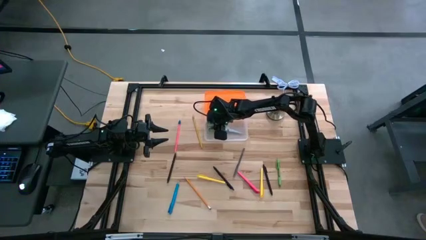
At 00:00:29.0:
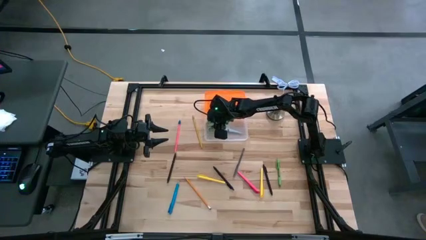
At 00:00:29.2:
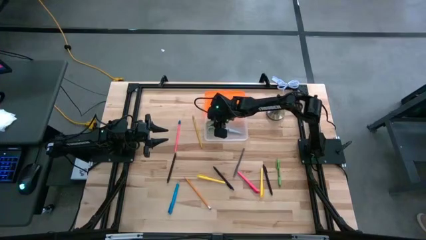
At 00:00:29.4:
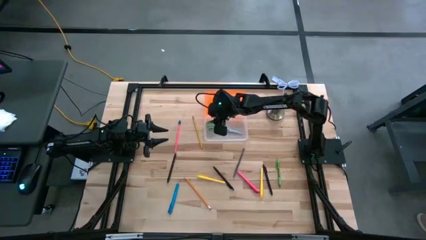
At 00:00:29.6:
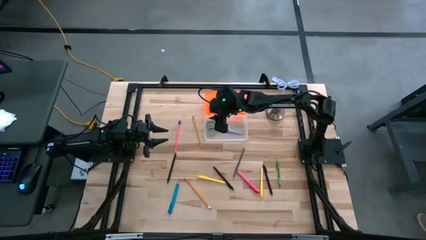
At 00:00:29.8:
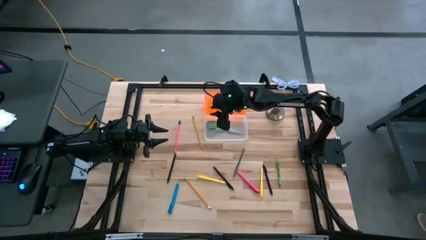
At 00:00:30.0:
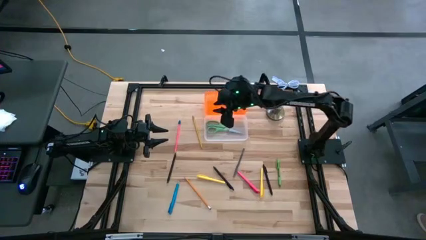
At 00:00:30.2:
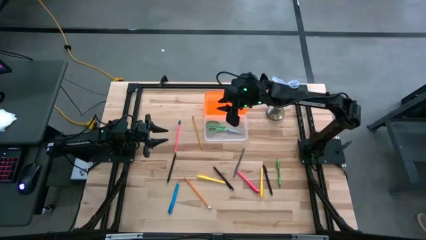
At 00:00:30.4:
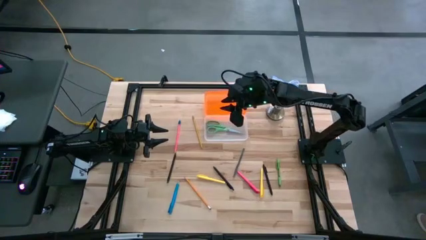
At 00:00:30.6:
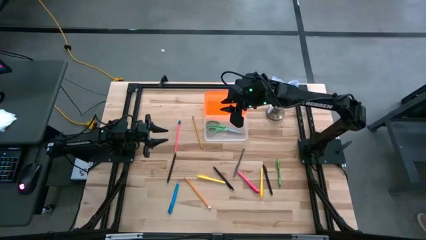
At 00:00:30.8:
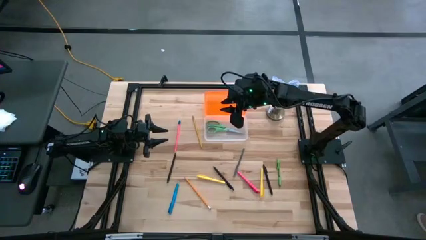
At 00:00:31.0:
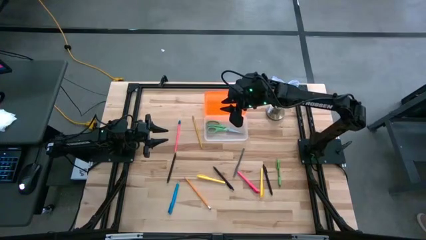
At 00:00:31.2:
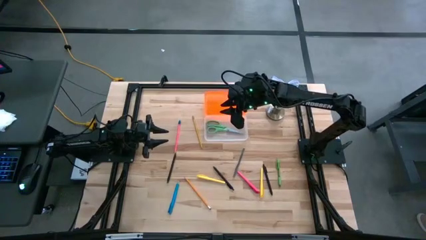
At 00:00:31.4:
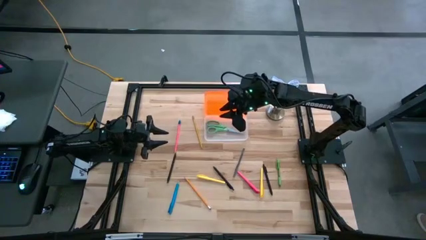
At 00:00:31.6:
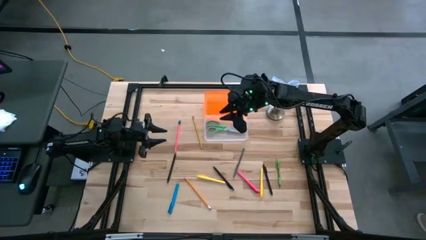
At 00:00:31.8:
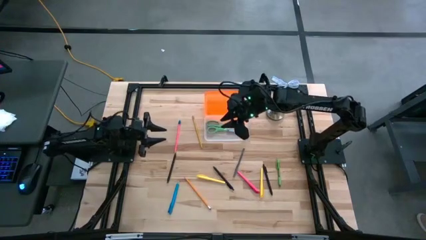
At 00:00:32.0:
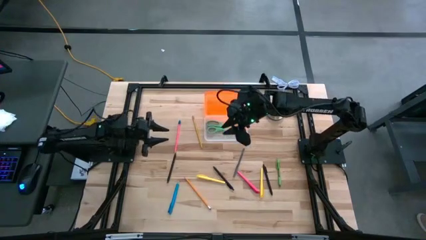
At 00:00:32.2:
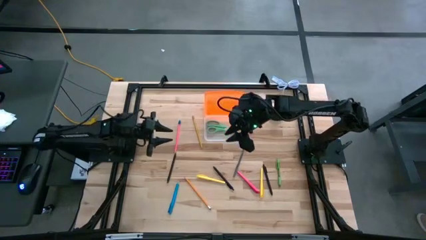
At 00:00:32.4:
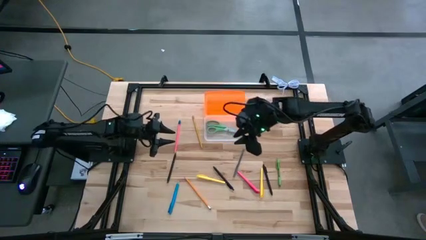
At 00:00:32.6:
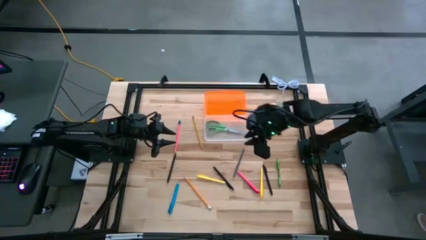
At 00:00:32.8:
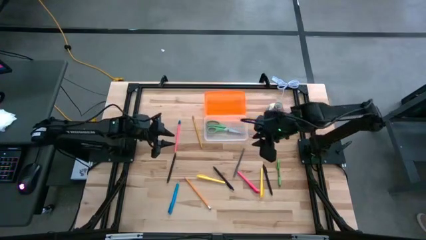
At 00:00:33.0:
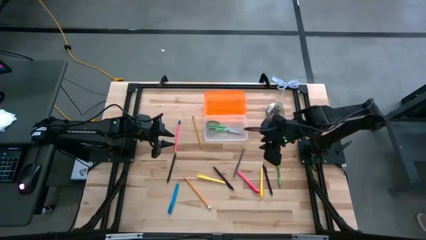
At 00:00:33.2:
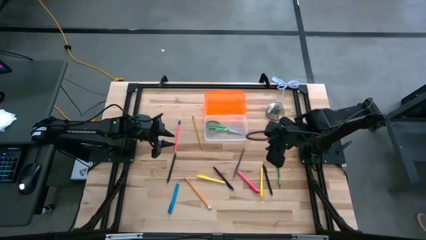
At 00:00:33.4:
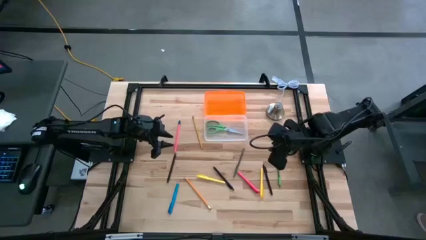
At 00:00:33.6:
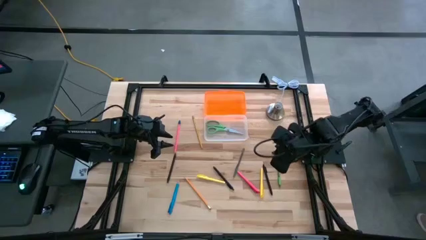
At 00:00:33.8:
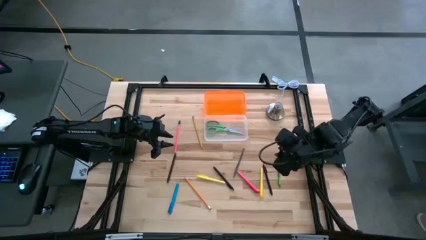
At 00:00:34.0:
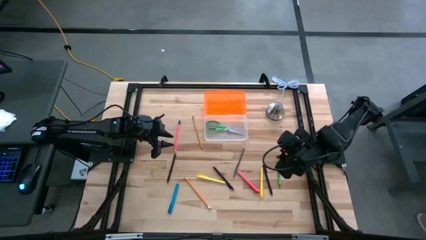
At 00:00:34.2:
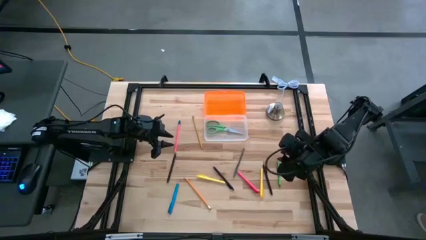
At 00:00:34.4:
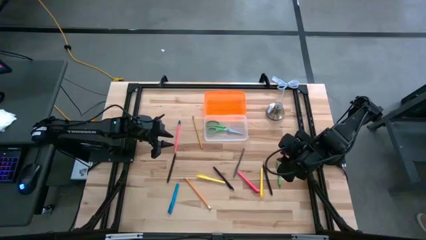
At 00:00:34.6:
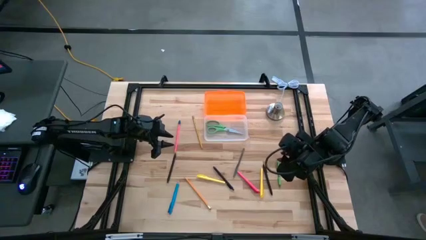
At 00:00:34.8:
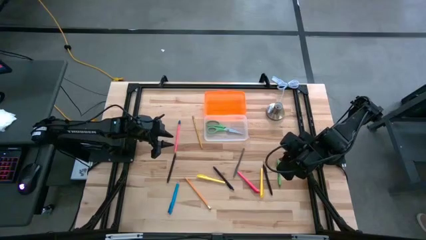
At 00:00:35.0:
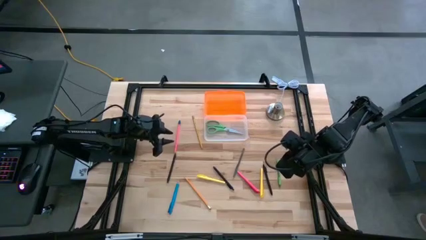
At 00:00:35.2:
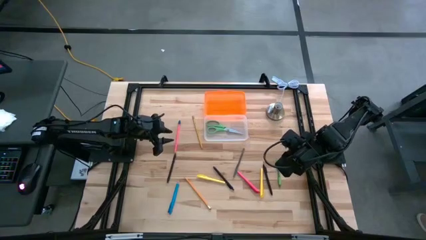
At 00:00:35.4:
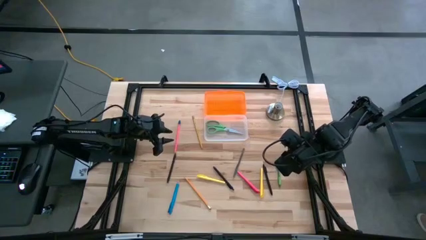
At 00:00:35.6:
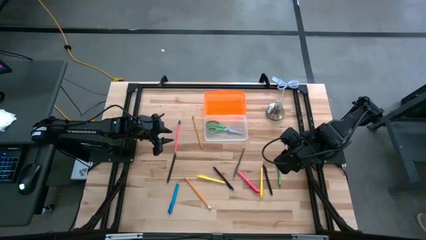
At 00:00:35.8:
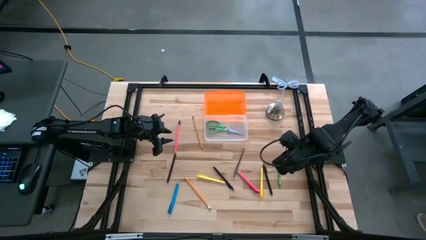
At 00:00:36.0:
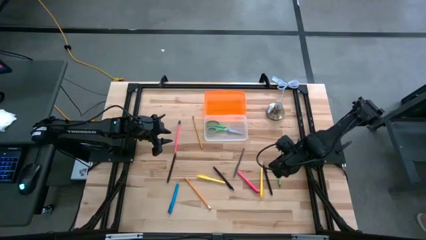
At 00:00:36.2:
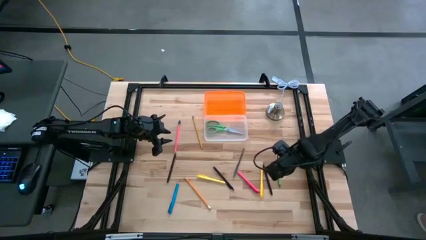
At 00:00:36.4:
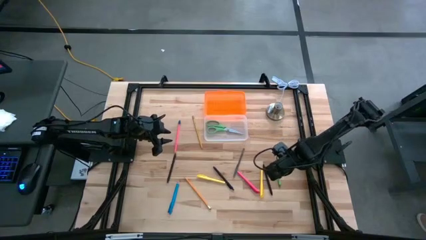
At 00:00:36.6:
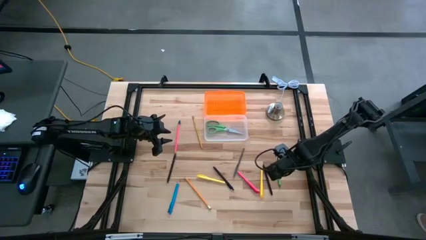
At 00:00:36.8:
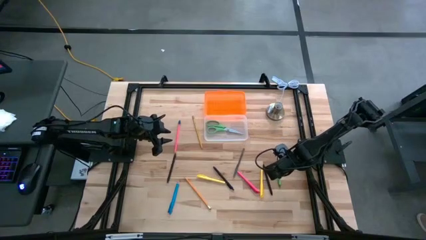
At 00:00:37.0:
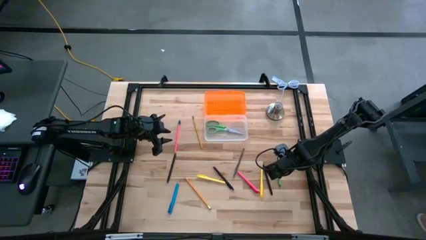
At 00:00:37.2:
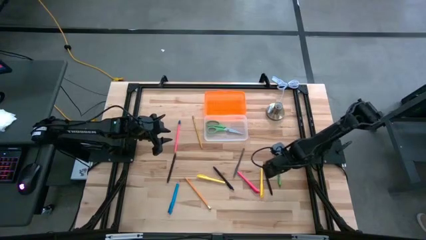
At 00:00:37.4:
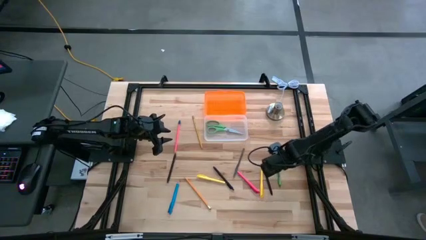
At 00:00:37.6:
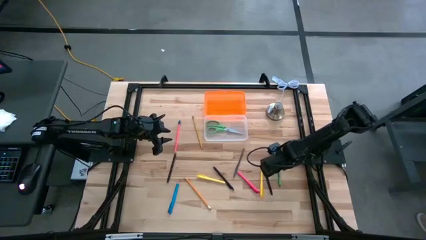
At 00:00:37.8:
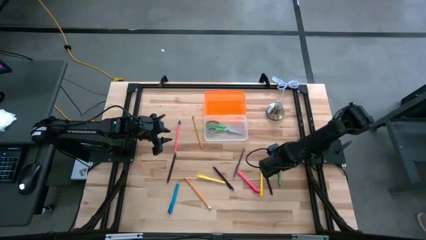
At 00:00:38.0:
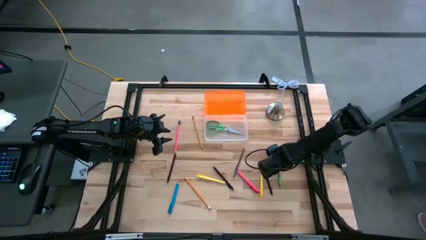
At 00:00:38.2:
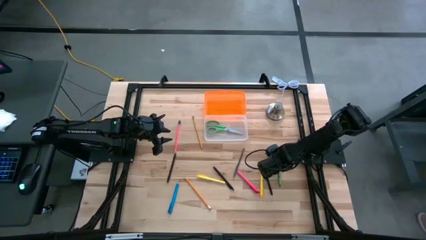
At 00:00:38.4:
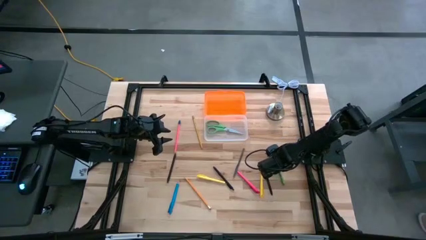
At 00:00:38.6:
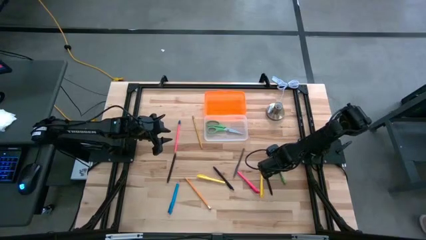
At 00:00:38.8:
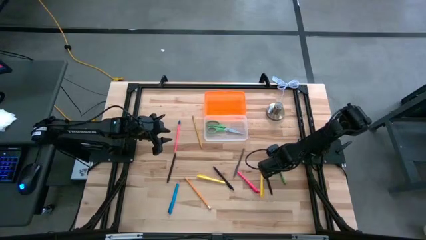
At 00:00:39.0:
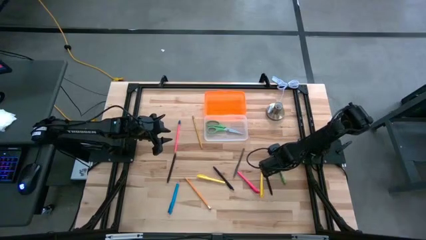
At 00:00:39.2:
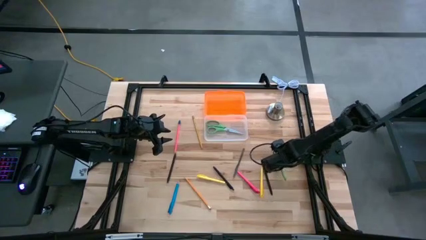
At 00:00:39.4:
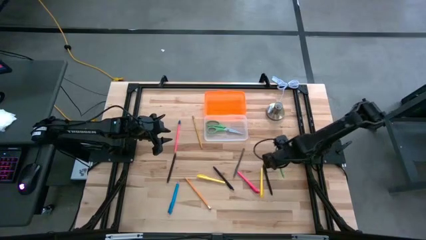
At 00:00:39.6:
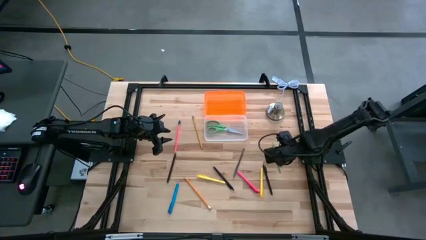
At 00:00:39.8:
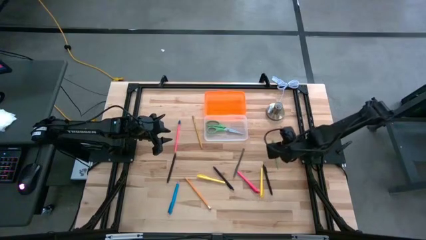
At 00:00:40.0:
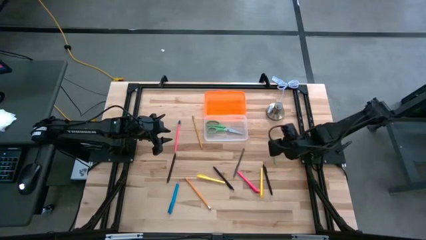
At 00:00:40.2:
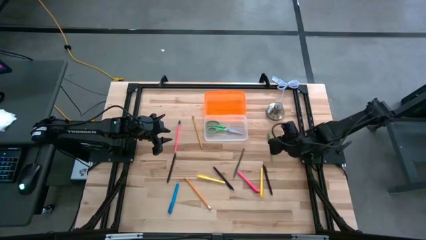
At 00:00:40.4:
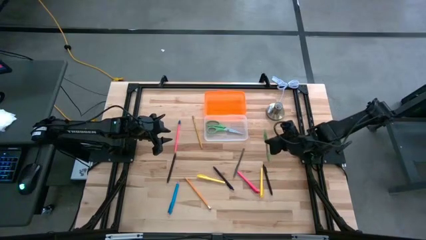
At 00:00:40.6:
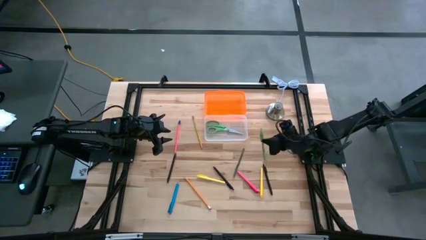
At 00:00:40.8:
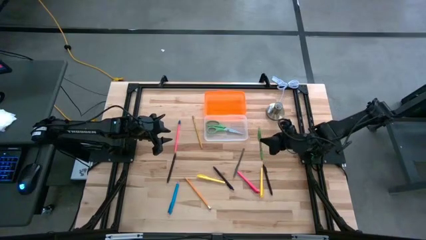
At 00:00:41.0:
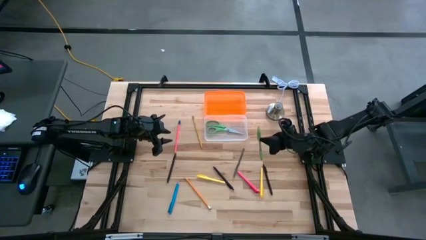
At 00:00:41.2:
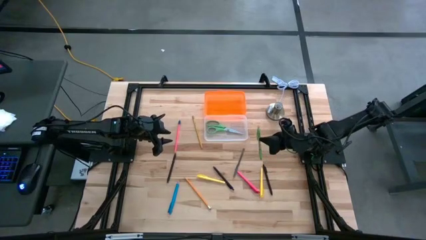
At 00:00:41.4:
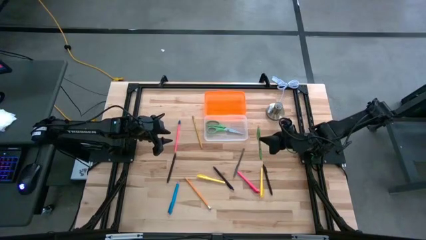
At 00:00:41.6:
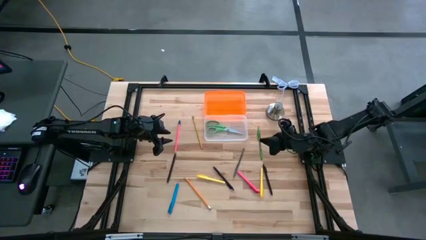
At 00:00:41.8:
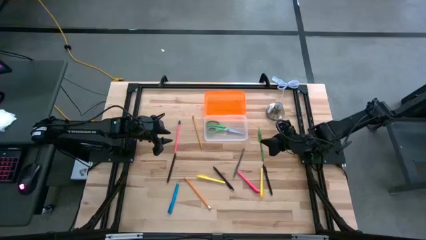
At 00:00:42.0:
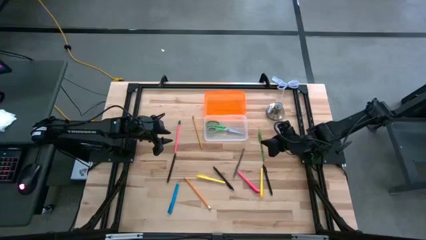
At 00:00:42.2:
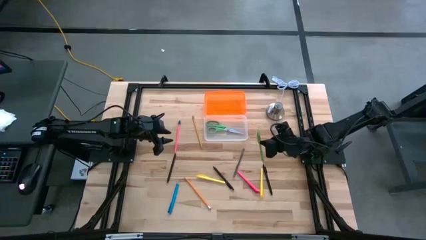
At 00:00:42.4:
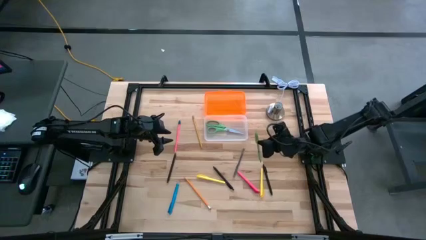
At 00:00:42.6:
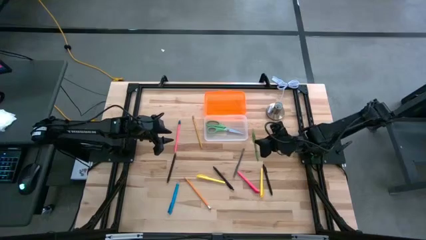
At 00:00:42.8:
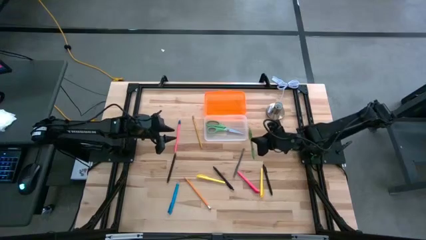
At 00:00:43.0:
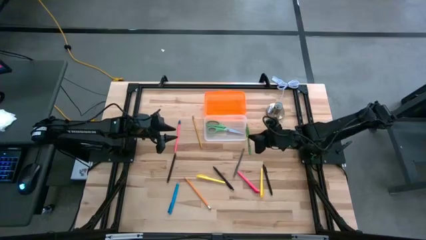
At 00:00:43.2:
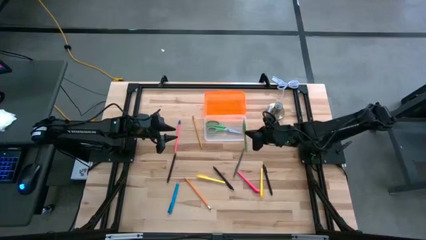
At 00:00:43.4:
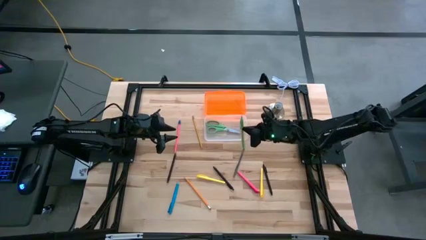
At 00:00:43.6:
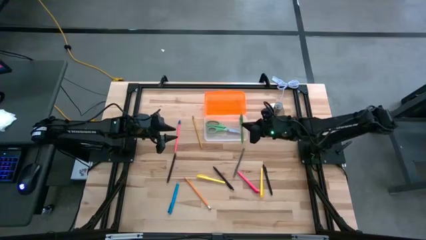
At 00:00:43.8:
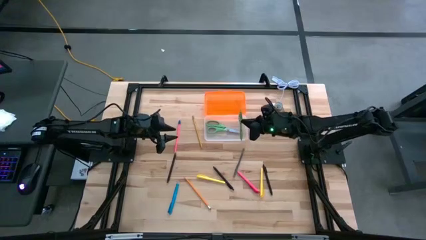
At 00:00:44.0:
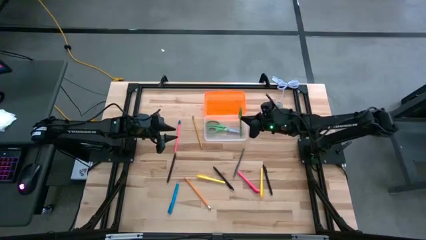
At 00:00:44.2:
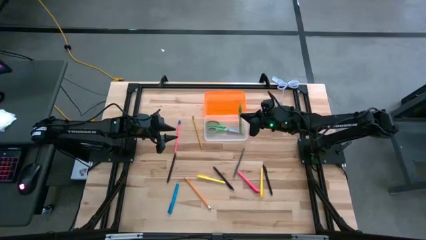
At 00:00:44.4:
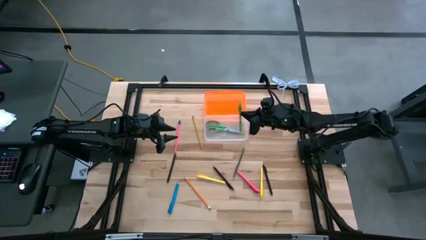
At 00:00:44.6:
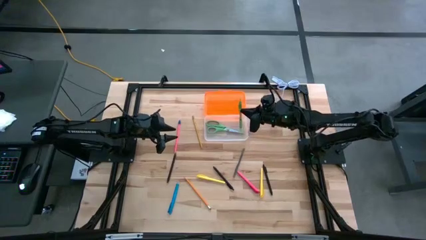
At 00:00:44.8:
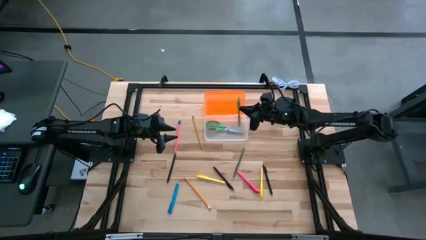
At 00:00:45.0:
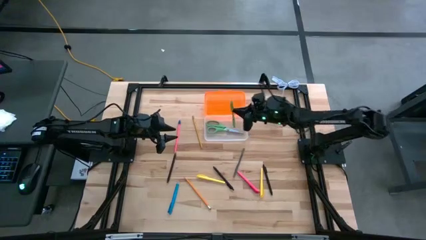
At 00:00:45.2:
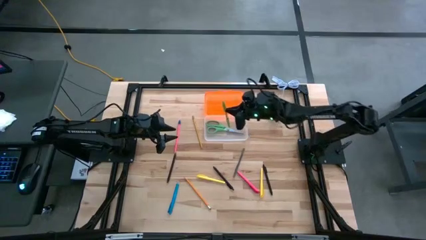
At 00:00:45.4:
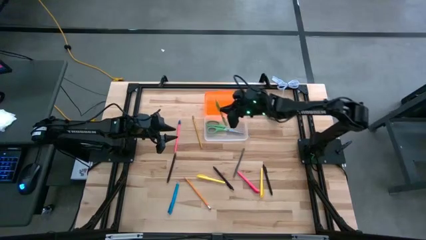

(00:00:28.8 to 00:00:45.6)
Task: Pick & place school supplies into a supply box
Put the green pen into the supply box
